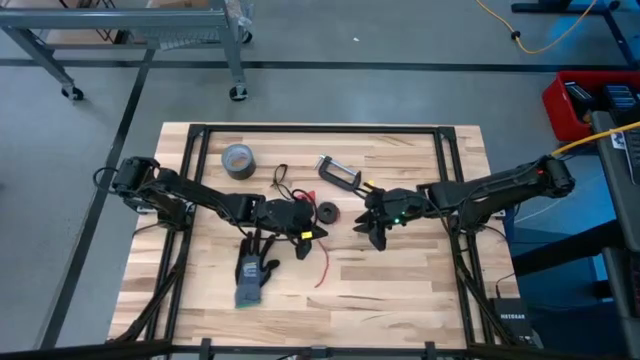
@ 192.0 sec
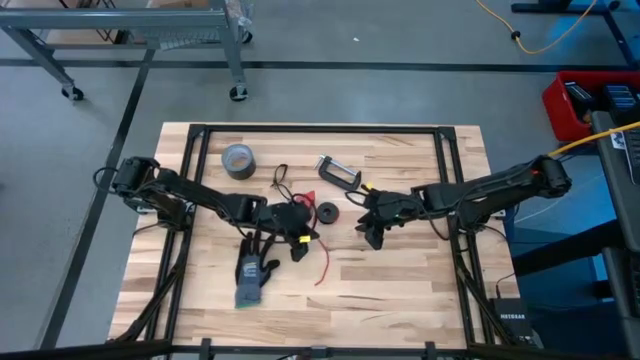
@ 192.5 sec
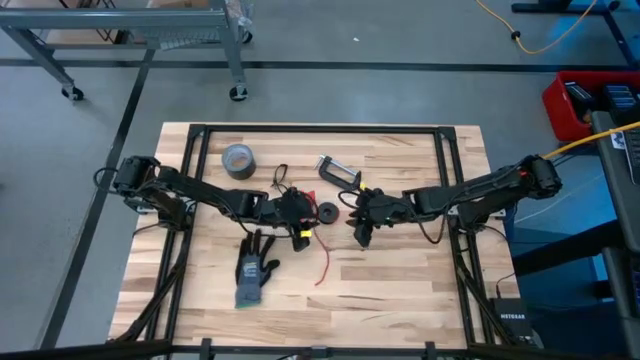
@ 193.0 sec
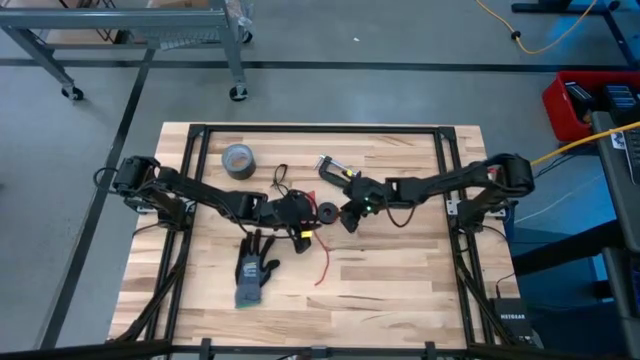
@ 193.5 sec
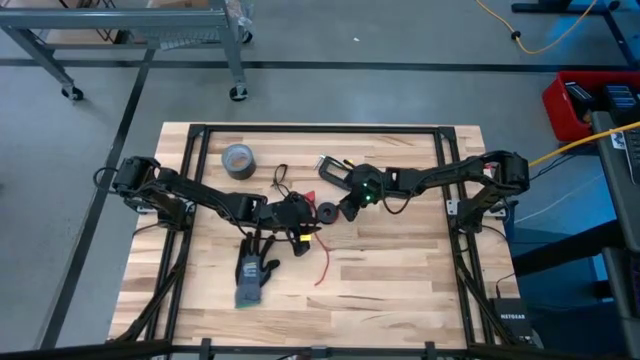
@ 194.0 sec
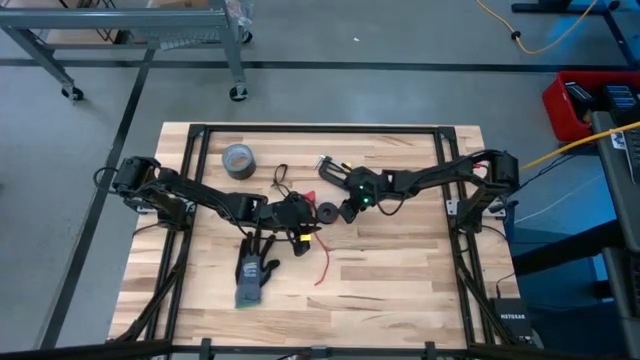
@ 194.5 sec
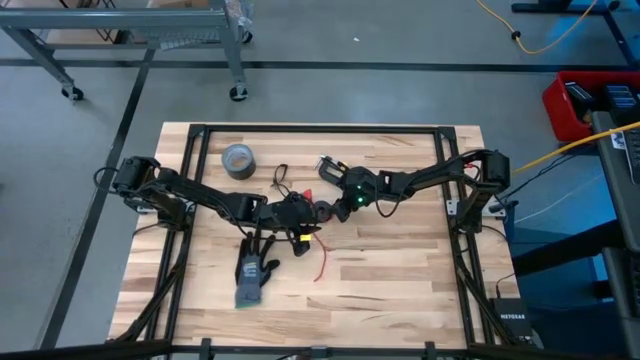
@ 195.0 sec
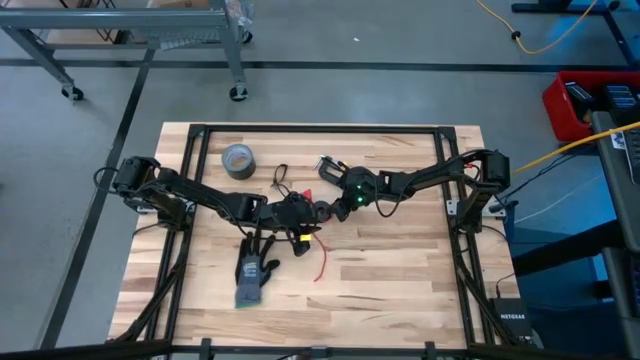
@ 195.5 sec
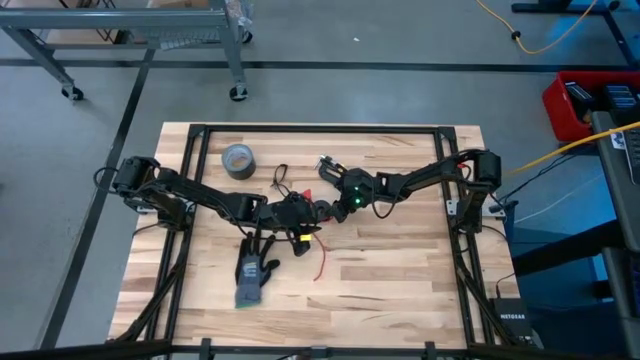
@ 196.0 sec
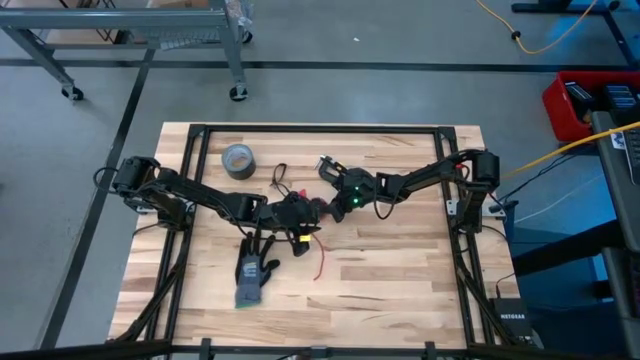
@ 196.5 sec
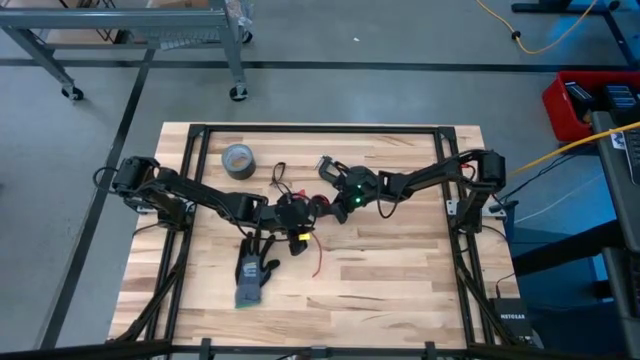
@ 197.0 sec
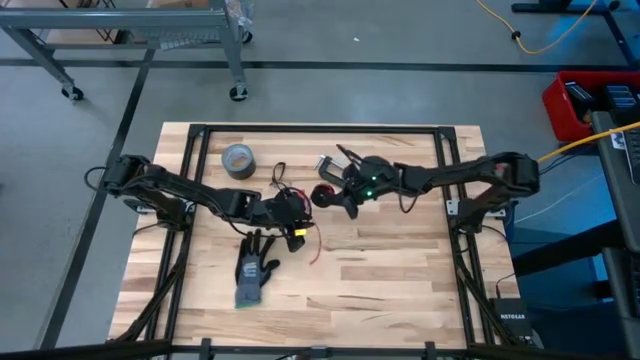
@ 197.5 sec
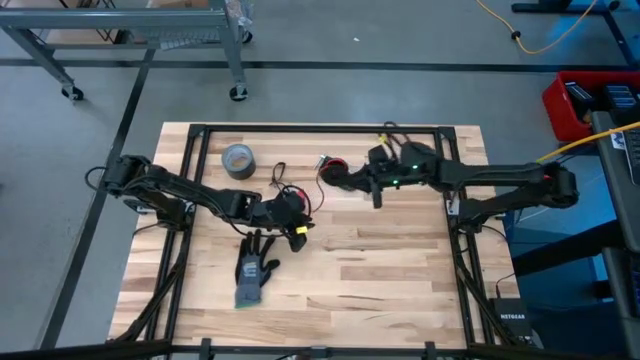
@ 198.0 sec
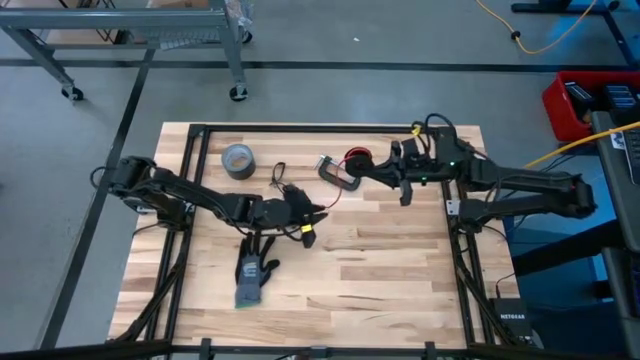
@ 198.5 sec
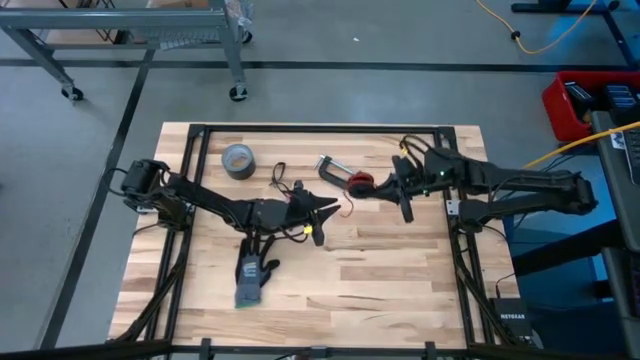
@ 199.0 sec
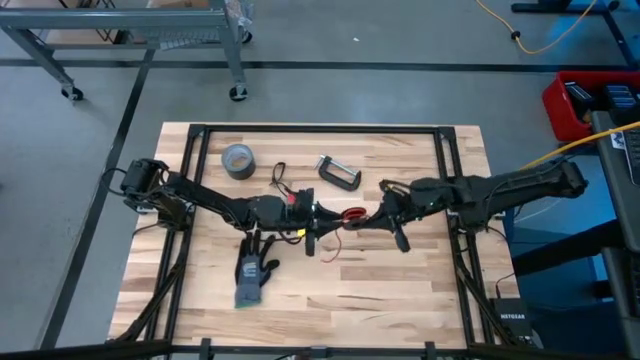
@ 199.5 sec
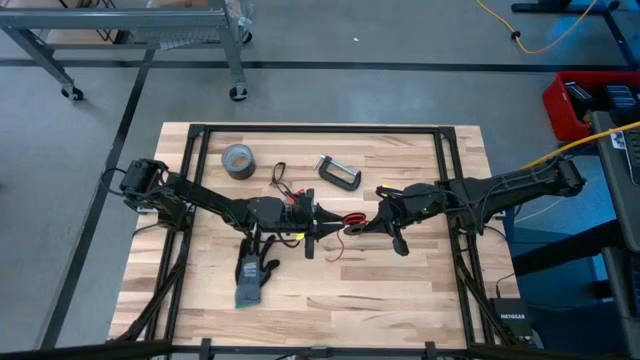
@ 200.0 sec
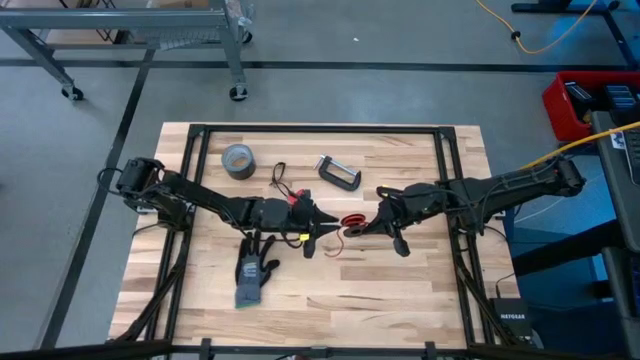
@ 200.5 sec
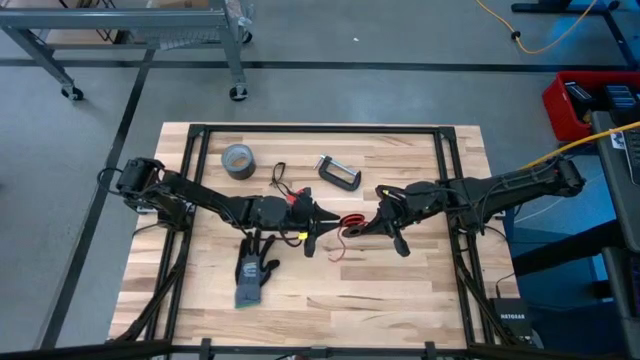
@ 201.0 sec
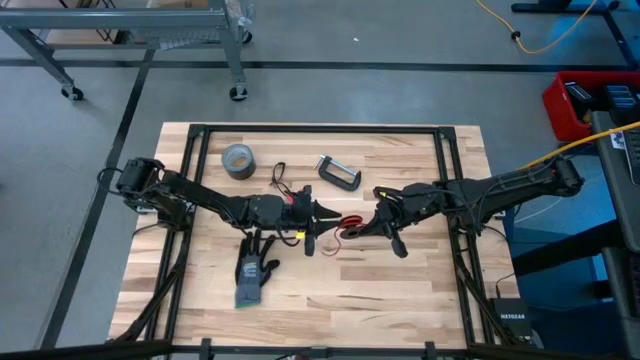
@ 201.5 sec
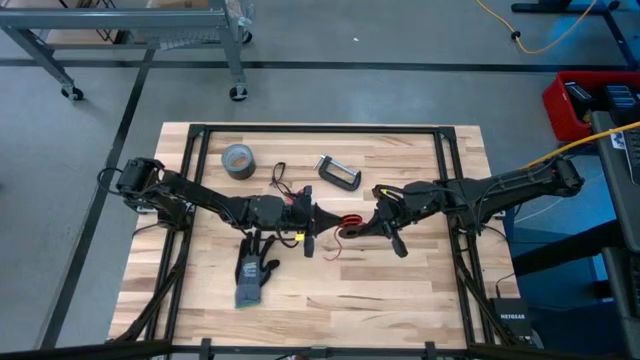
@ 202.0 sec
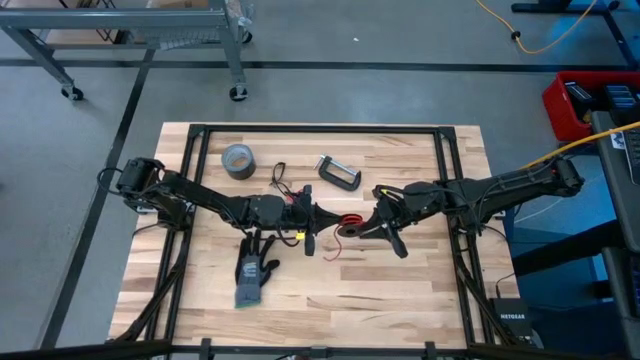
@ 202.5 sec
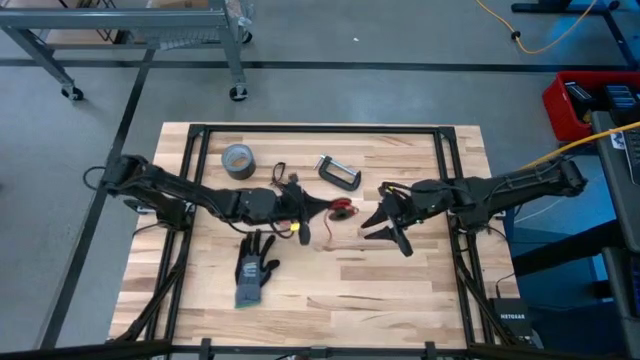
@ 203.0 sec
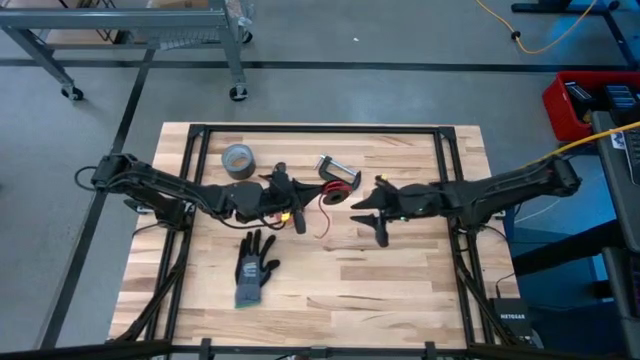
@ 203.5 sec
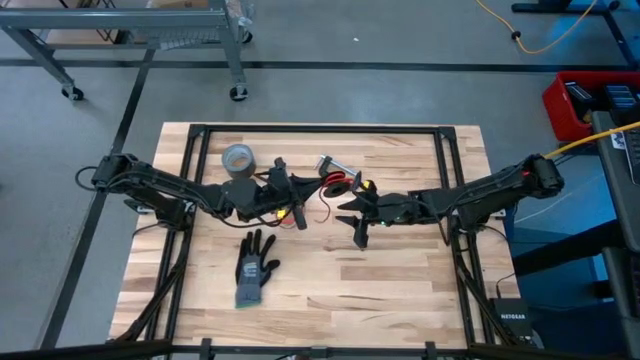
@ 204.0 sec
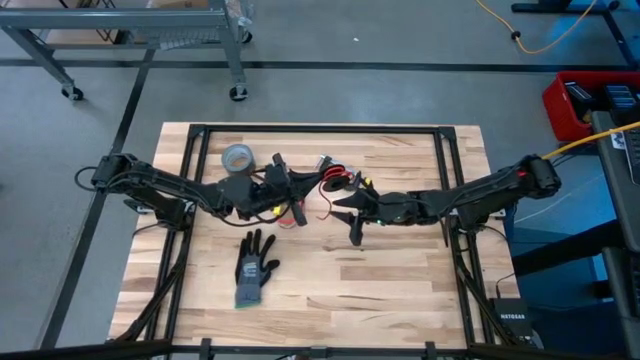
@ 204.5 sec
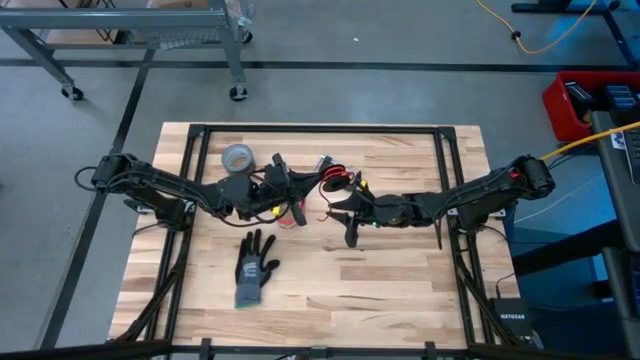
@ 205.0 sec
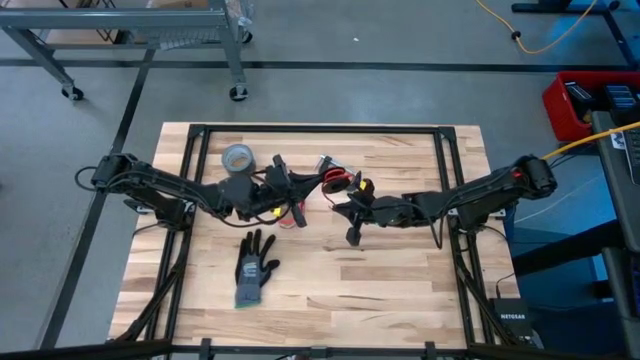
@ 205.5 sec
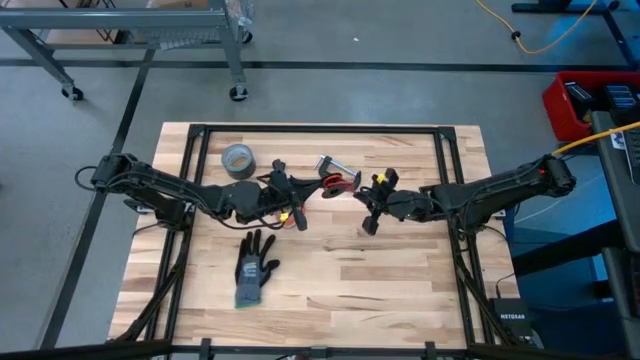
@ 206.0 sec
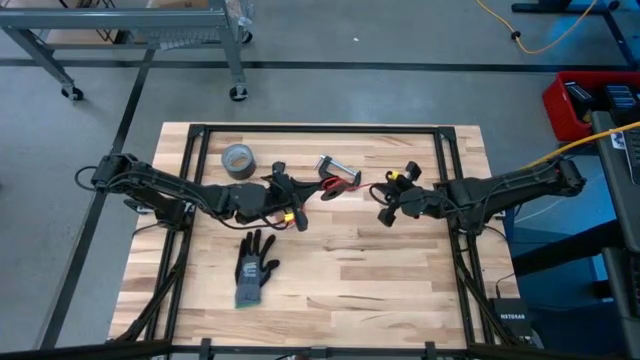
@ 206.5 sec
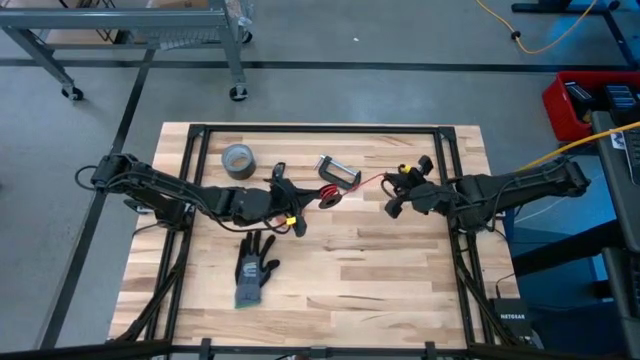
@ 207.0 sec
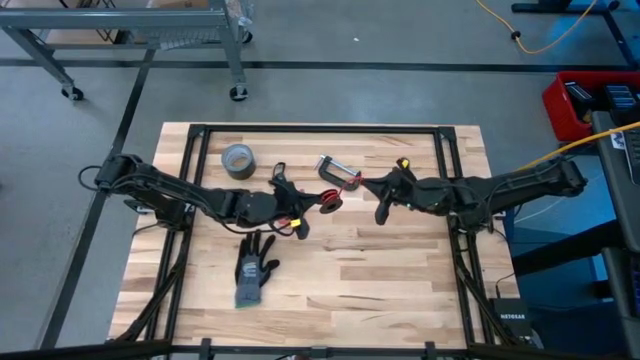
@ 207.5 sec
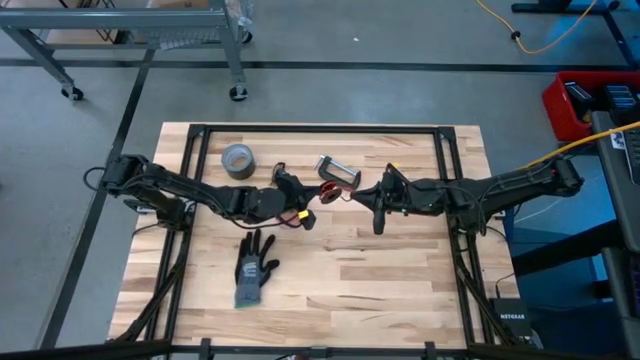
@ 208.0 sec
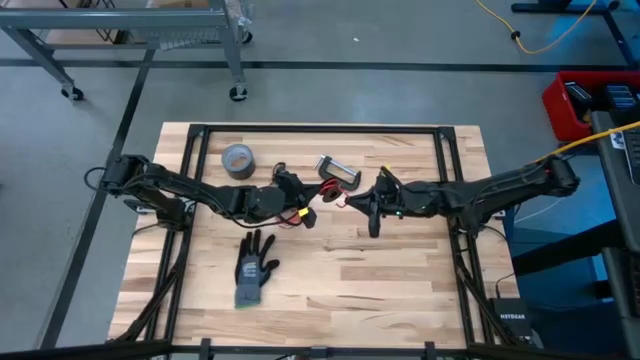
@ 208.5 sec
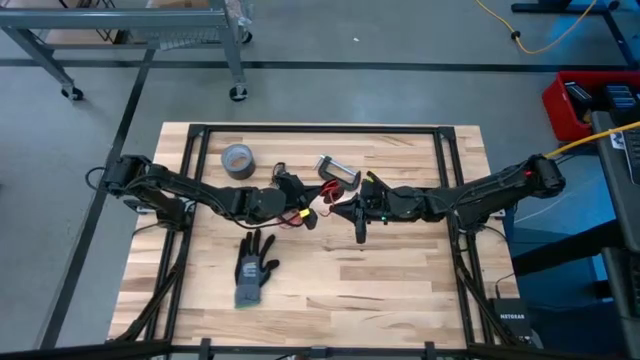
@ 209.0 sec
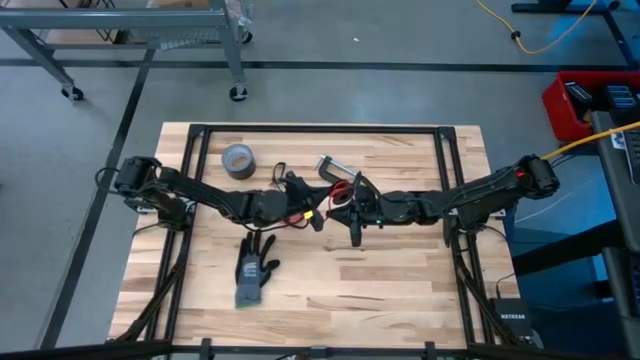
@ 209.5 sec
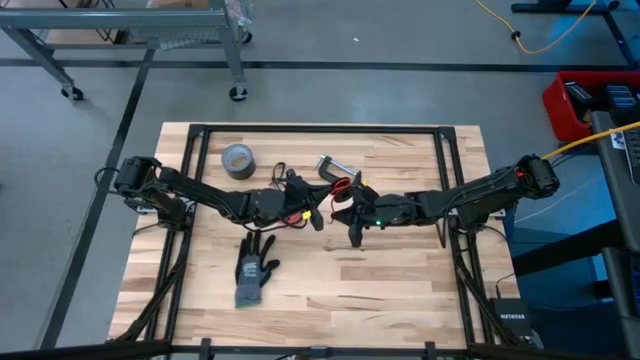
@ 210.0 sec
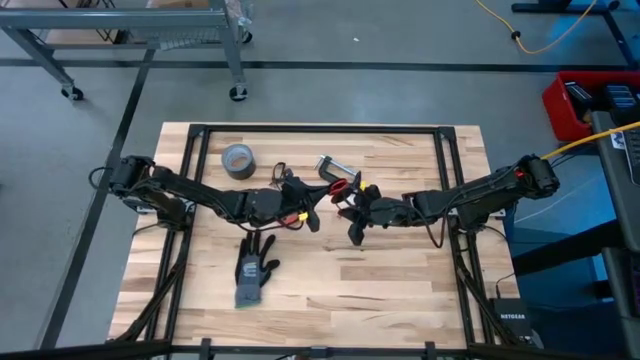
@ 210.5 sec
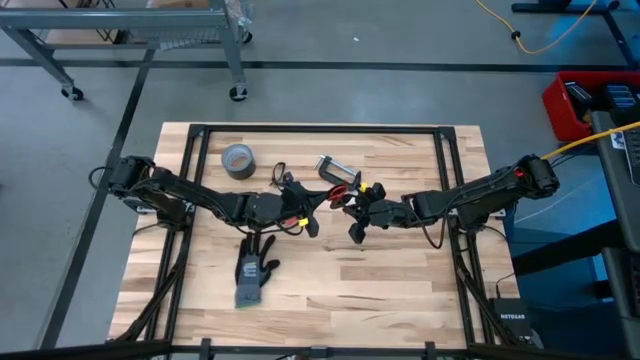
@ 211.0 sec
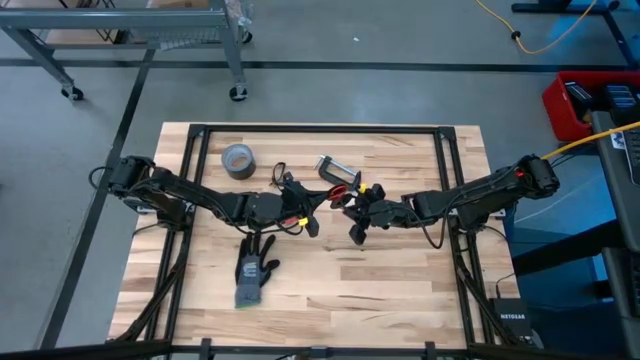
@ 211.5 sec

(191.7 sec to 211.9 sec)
Task: Coil cords
Coil the red wire onto the spool

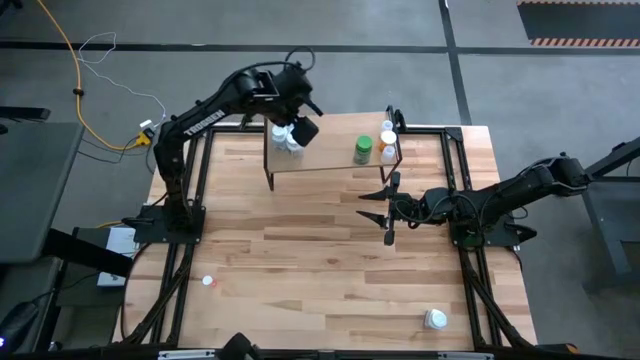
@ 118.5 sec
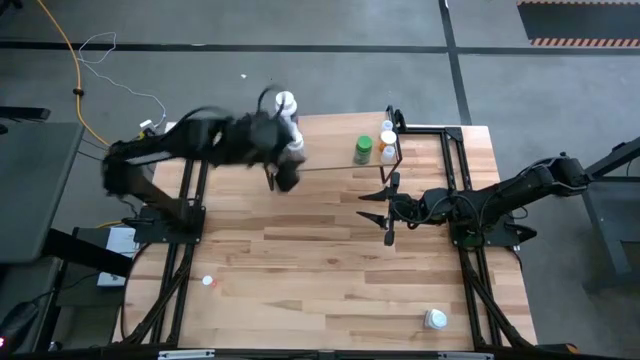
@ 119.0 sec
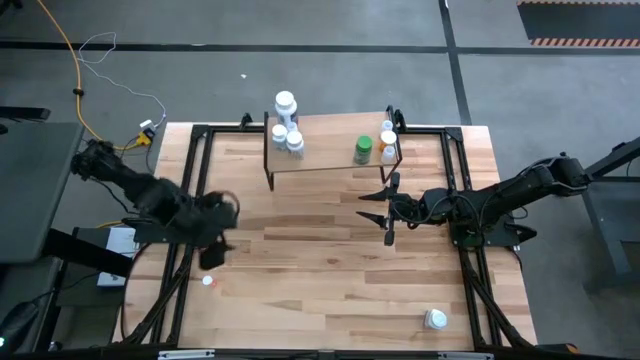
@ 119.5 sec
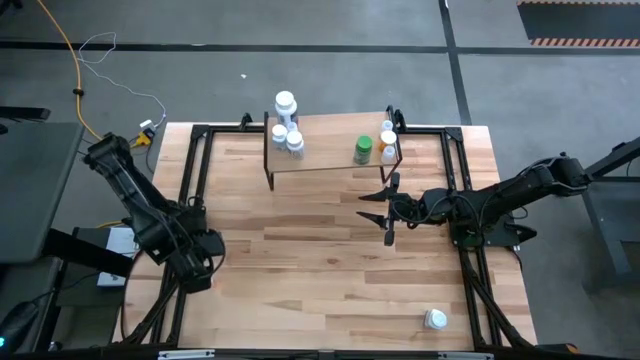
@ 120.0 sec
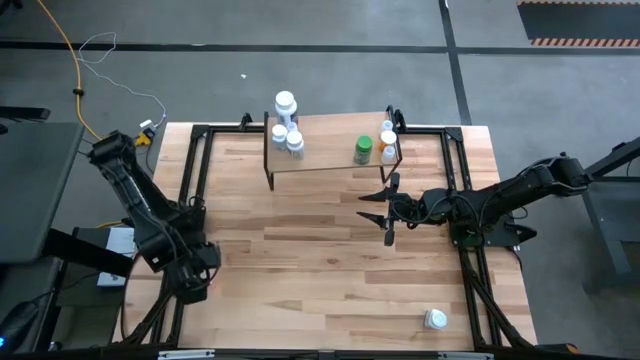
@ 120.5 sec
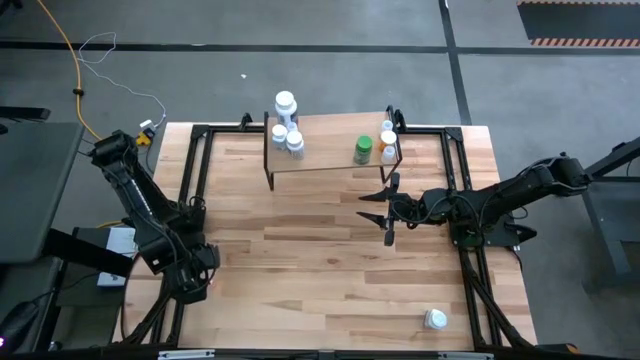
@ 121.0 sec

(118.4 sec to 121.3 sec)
Task: Pick and place medicine bottles onto shelf by color
Put the pink pill bottle on the shelf
